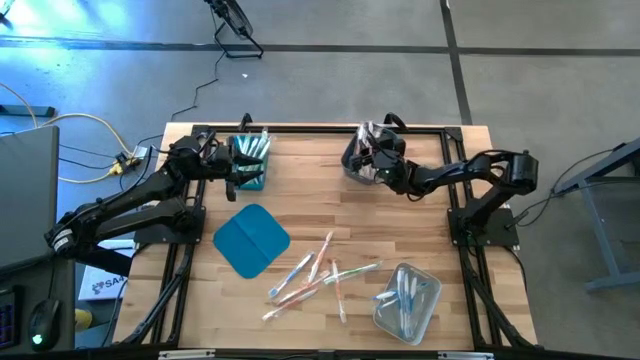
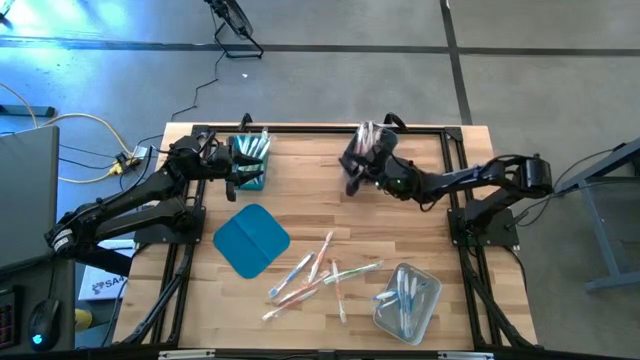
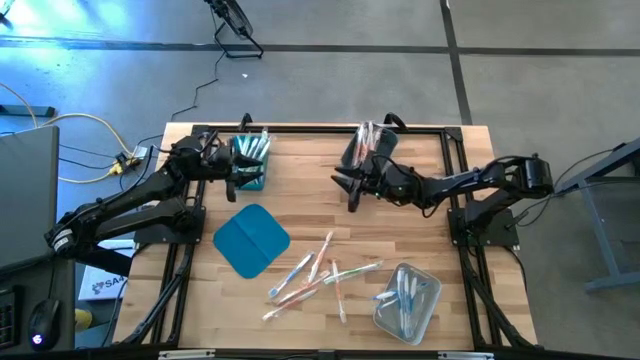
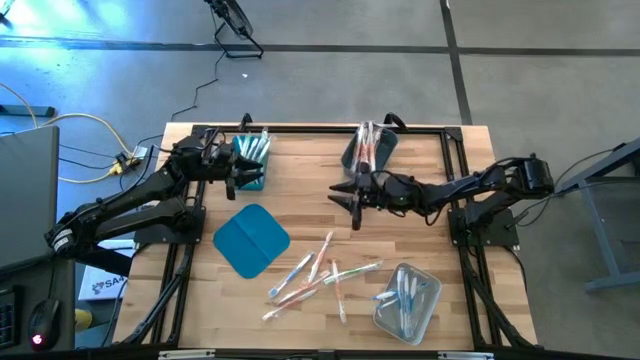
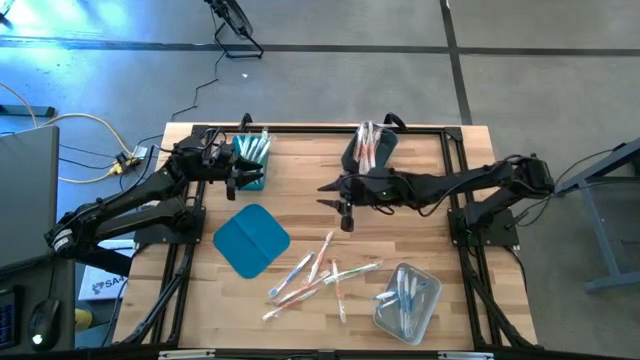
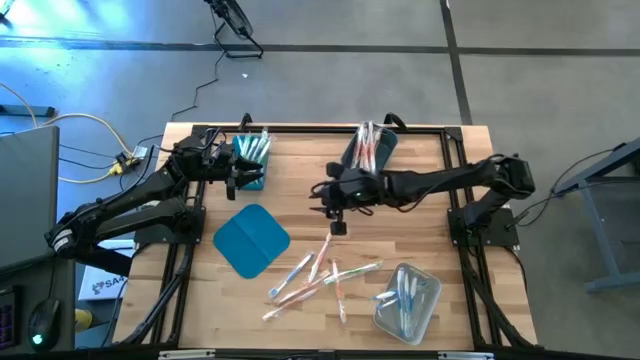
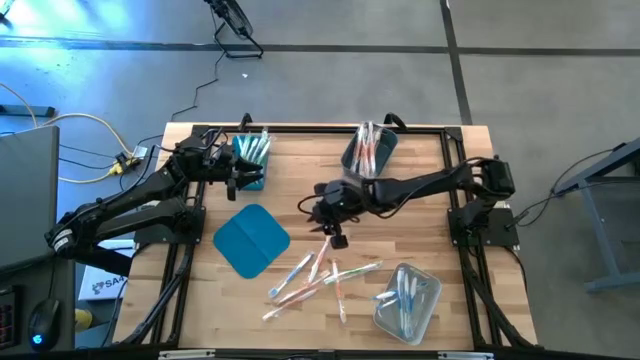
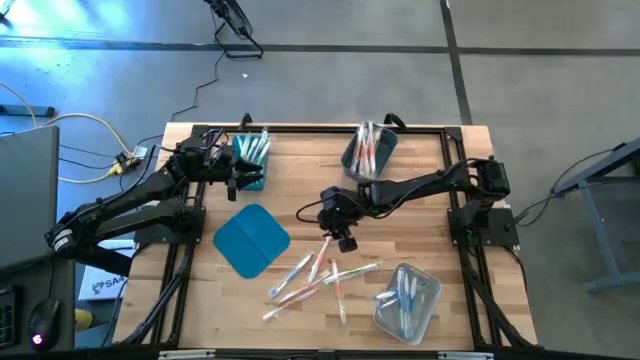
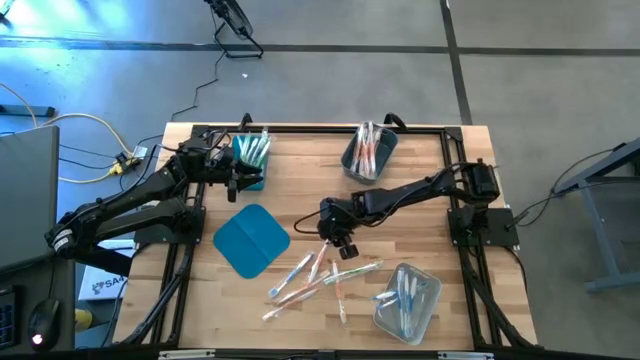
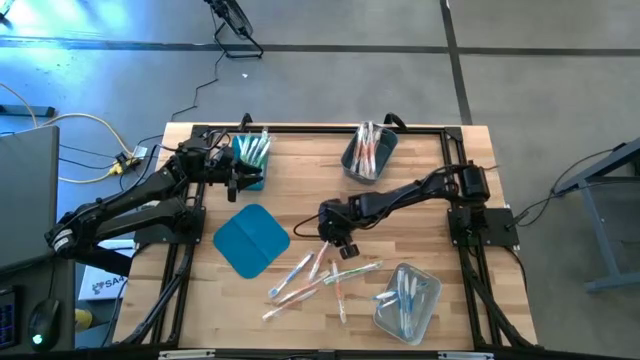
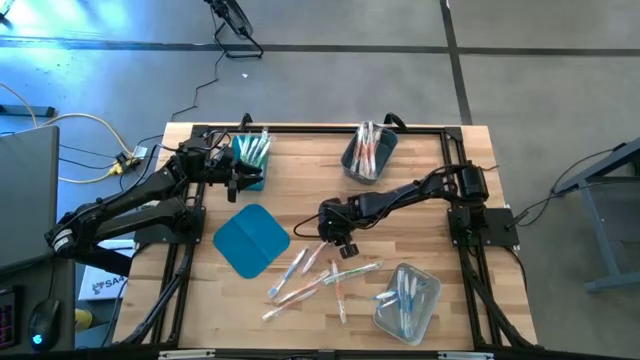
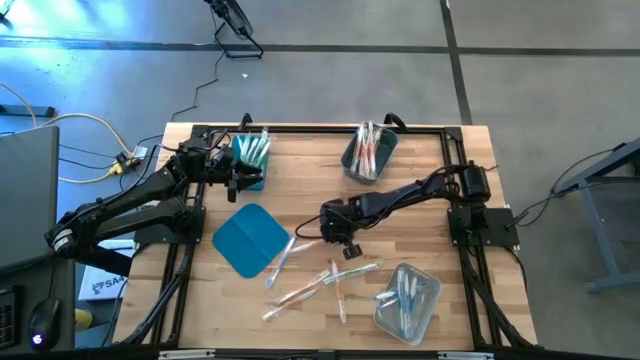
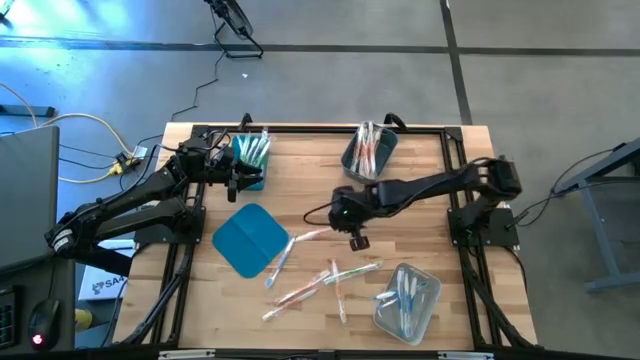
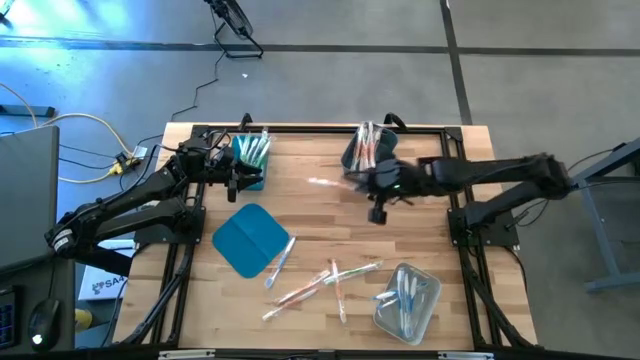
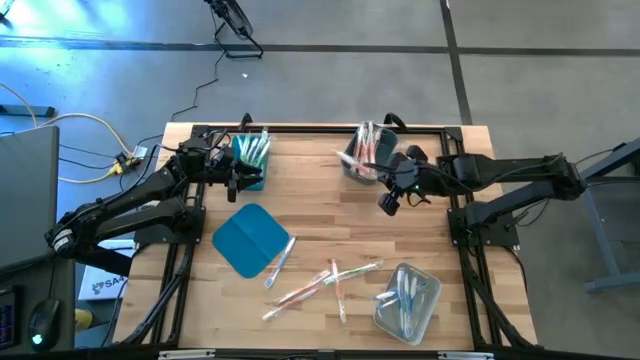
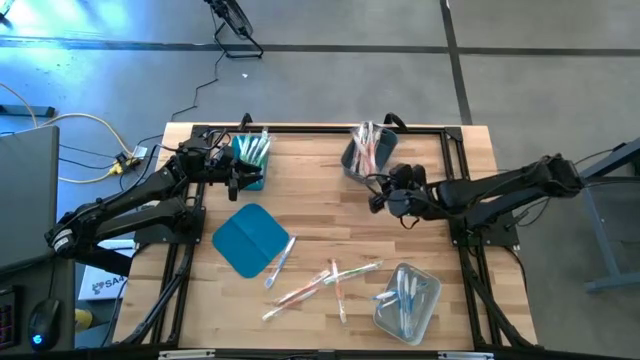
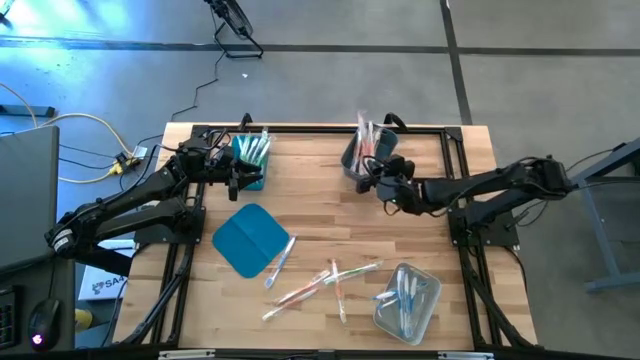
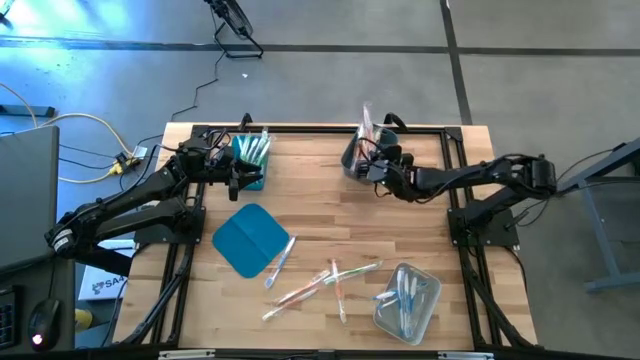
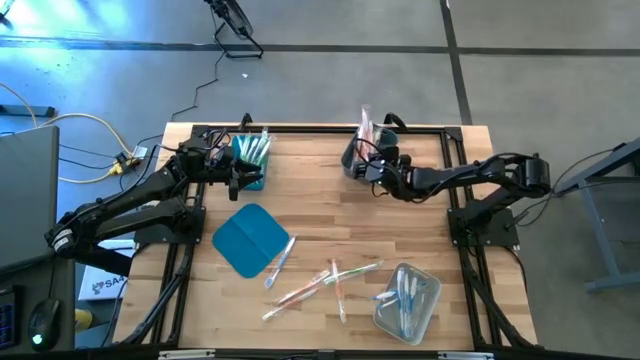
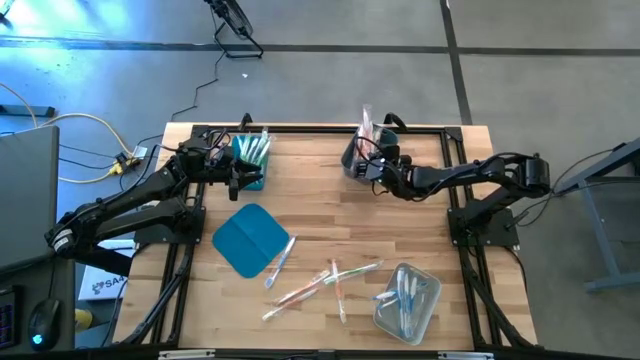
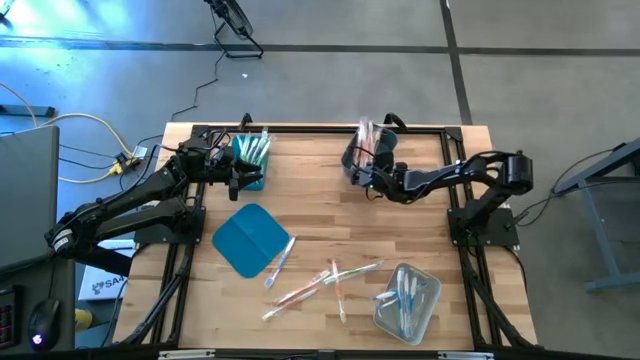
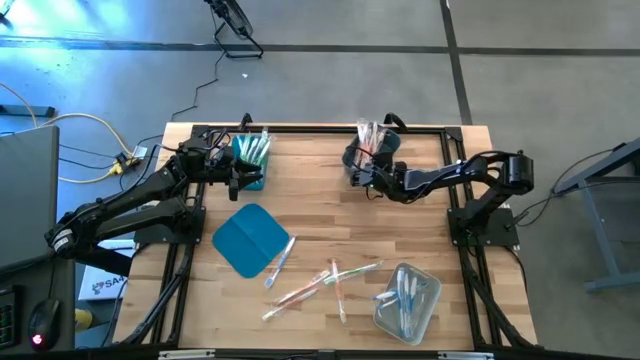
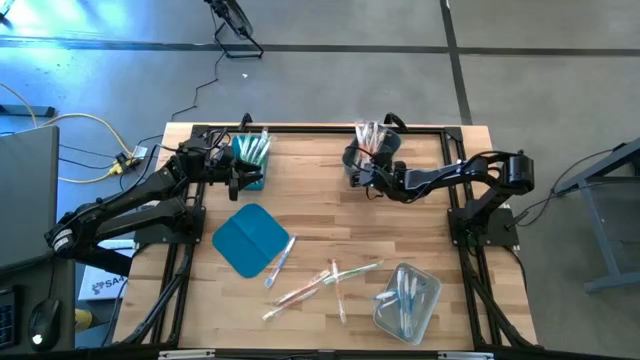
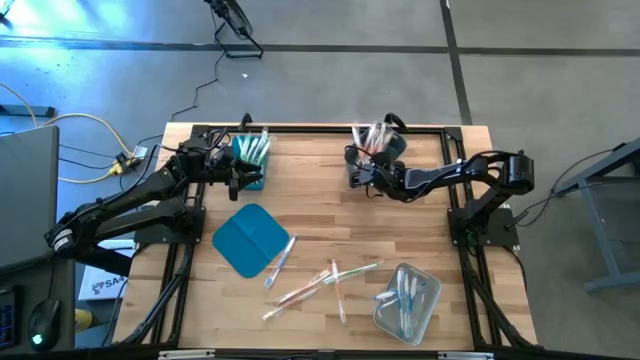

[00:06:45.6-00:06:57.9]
Task: Pick & Place Toothbrushes
Put the orange toothbrush into the dark gray bin

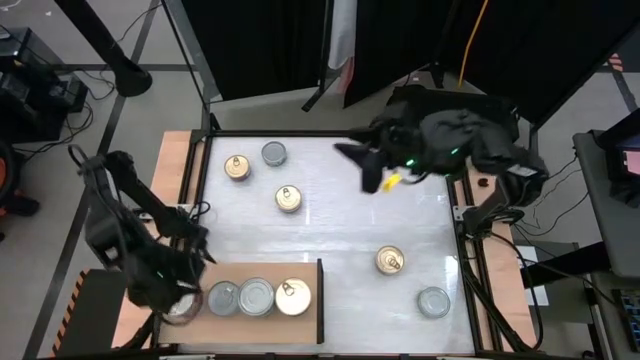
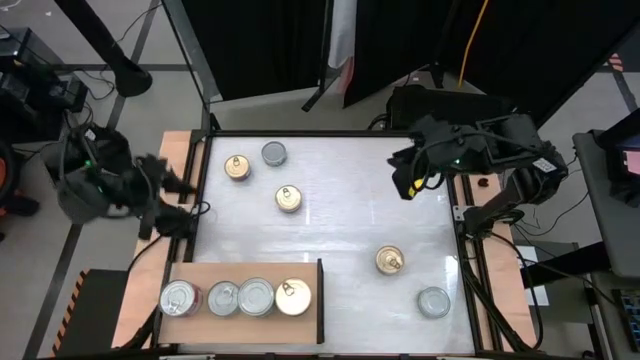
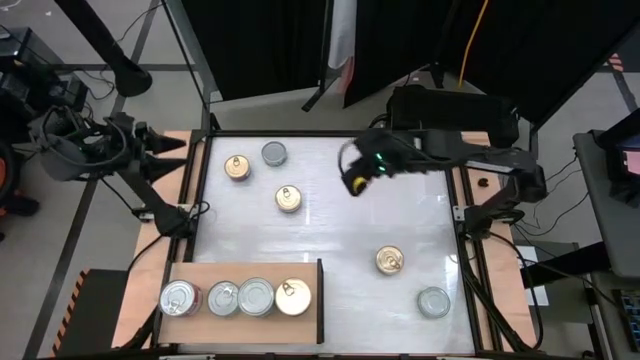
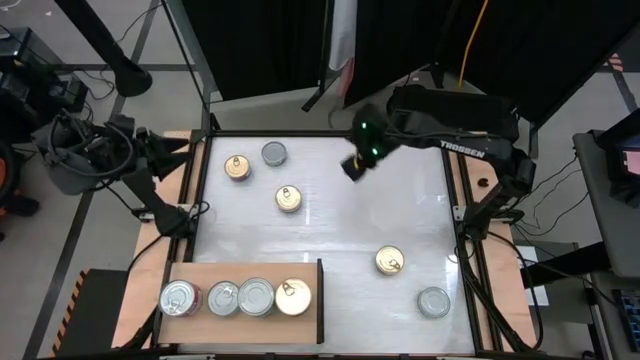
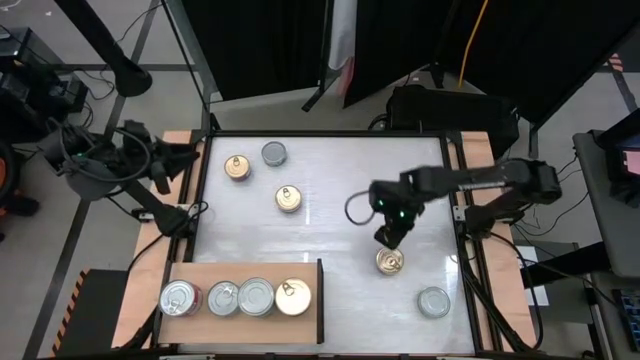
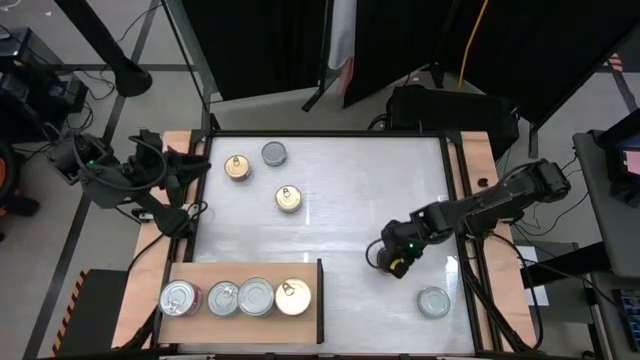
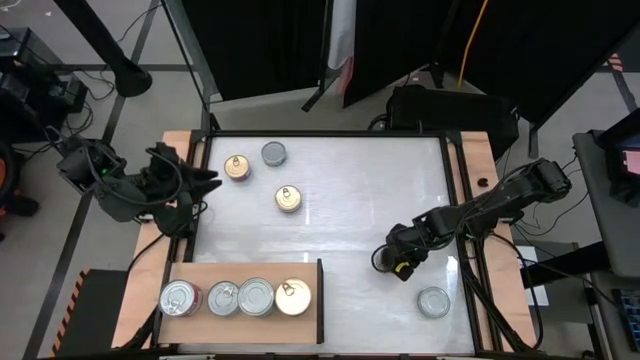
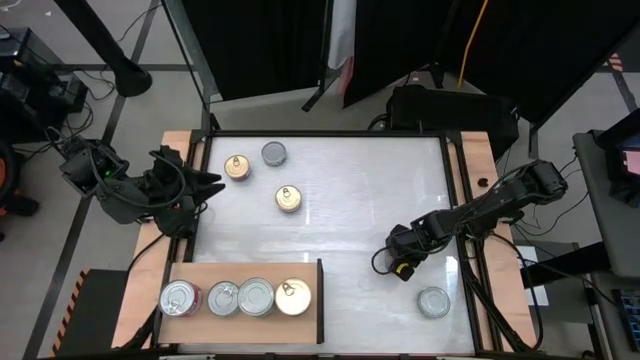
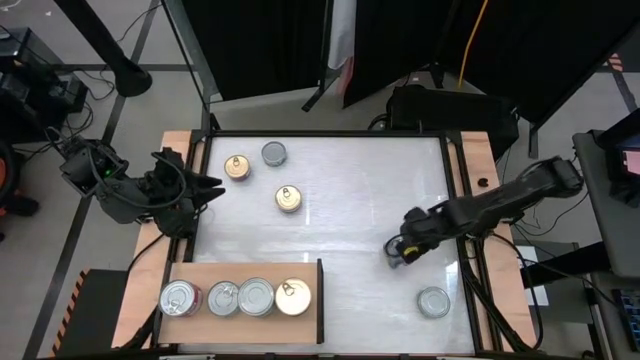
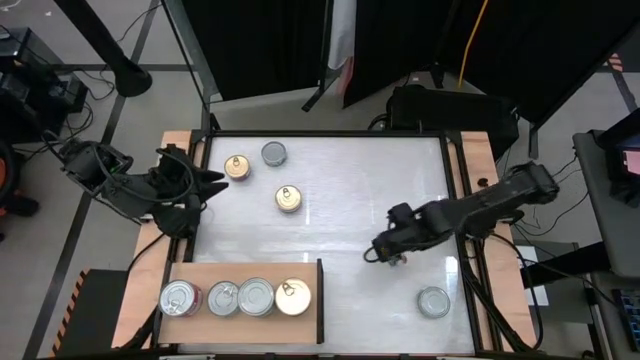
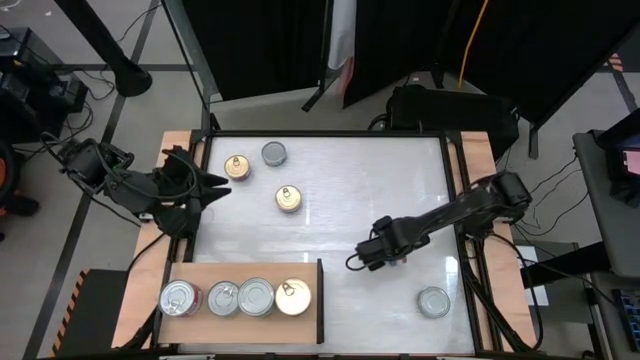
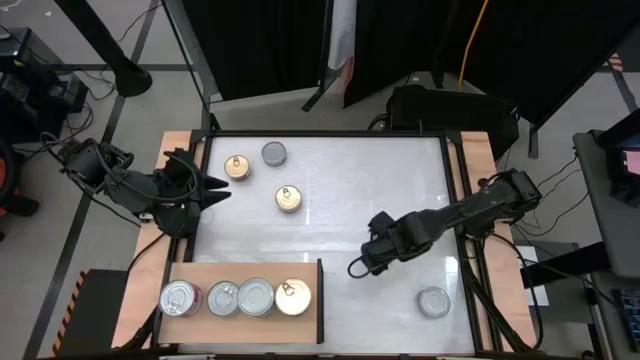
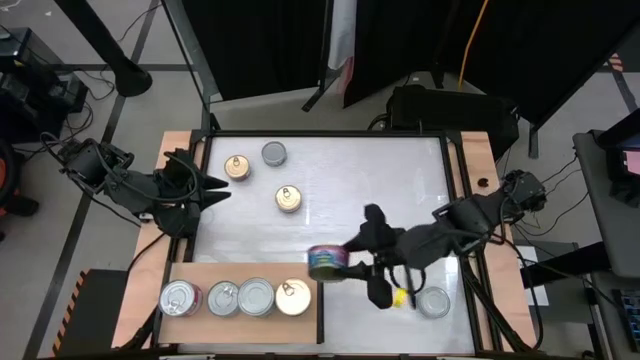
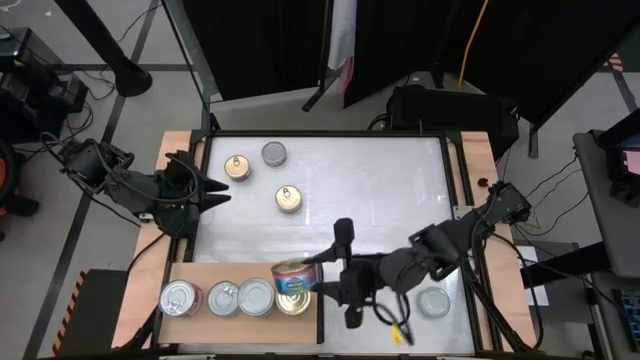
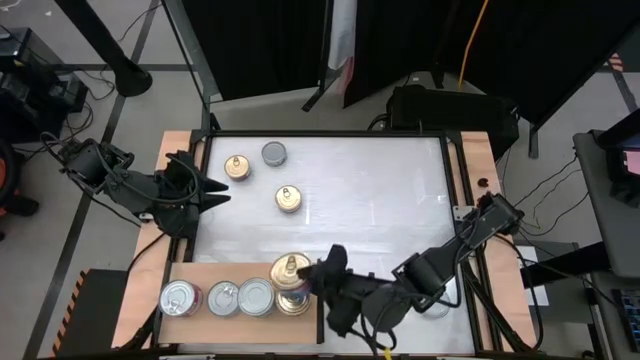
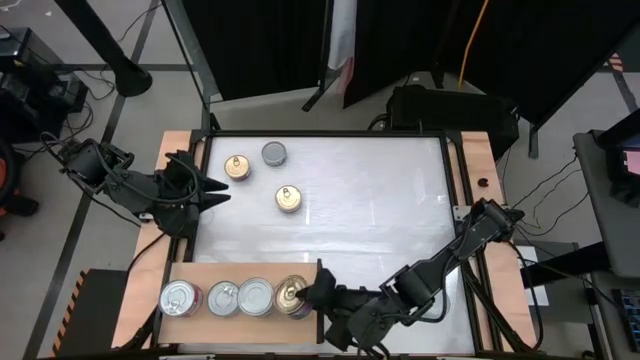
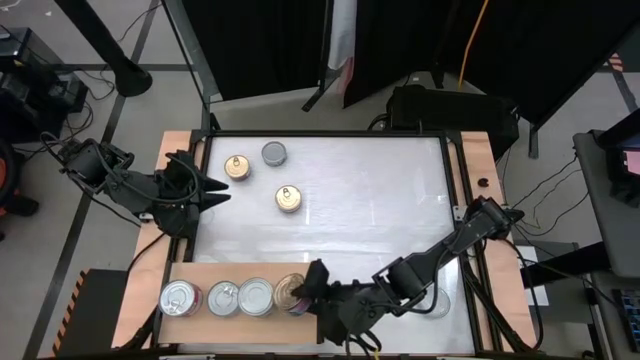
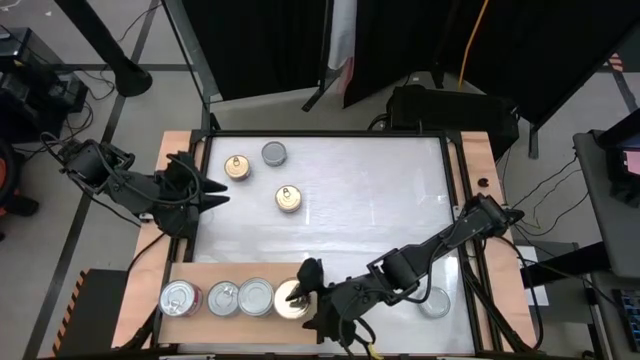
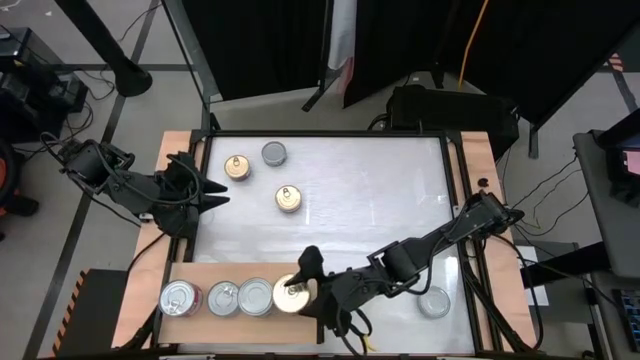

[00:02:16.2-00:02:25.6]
Task: Stack canned seafood by type on shelf
Stack the blue pink tuna can on top of the other blue pink tuna cans on the shelf
